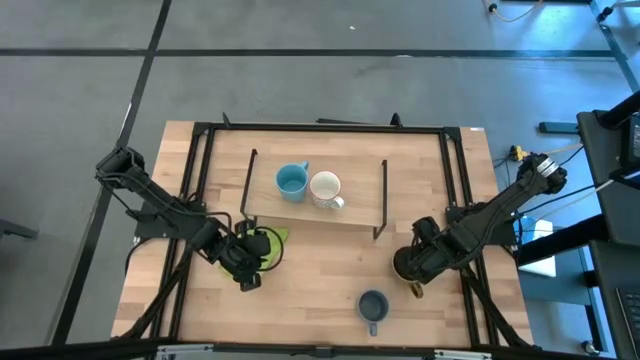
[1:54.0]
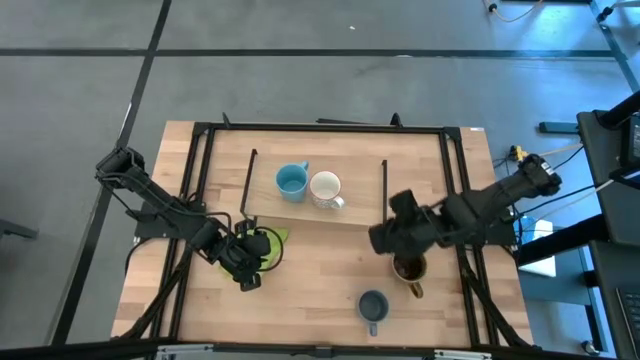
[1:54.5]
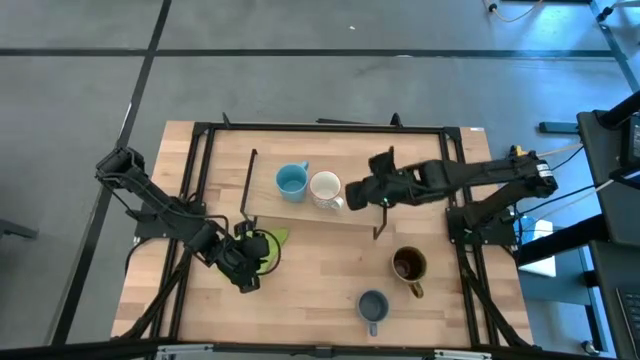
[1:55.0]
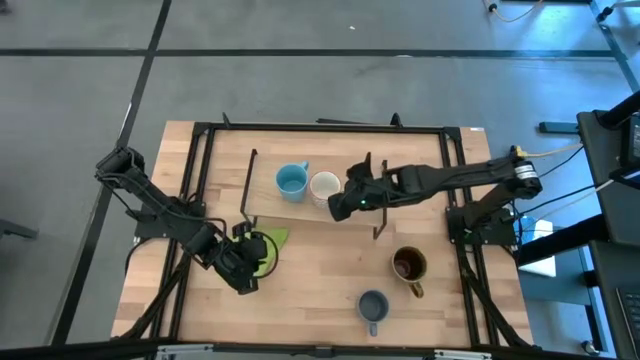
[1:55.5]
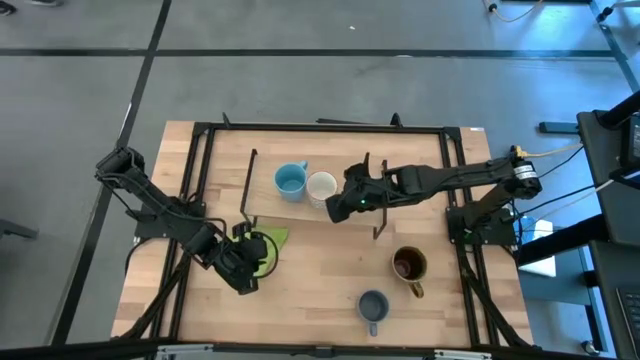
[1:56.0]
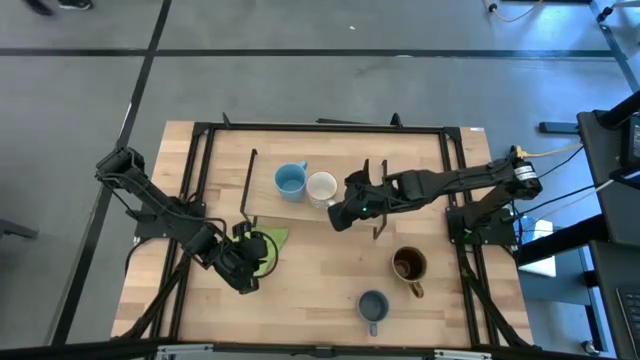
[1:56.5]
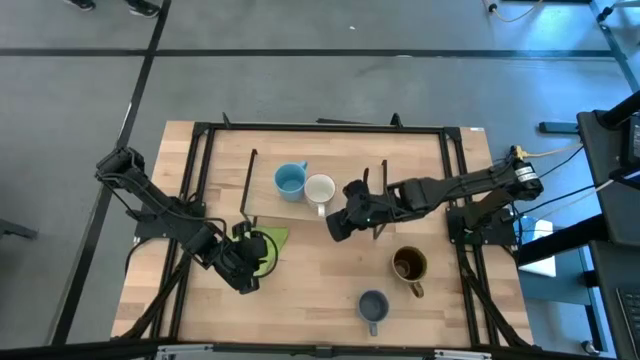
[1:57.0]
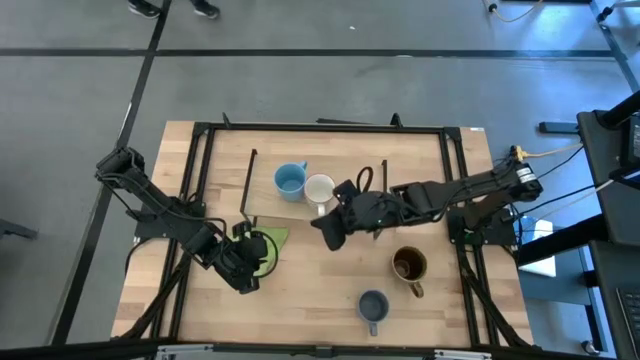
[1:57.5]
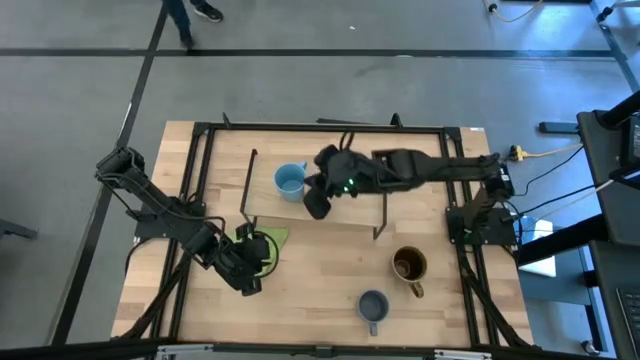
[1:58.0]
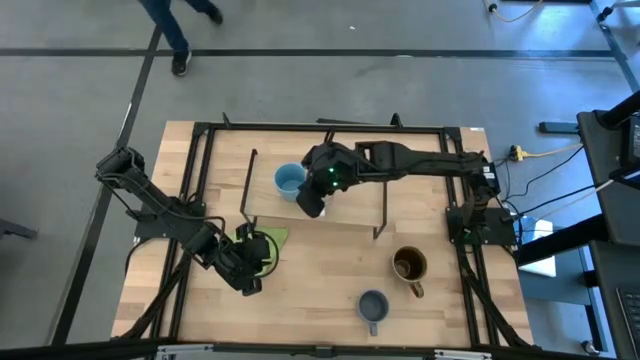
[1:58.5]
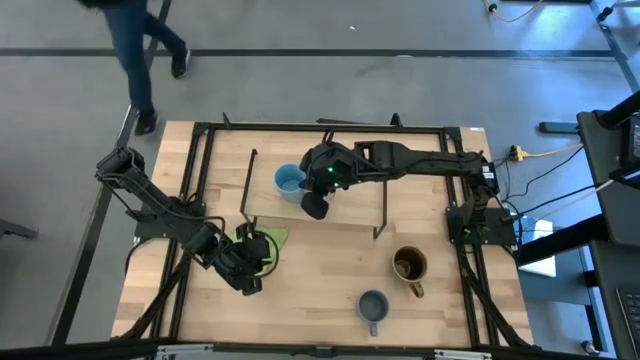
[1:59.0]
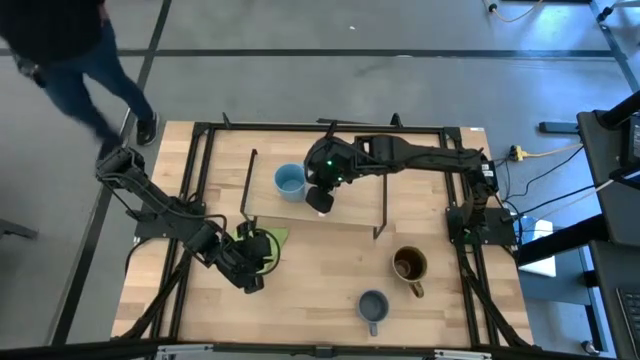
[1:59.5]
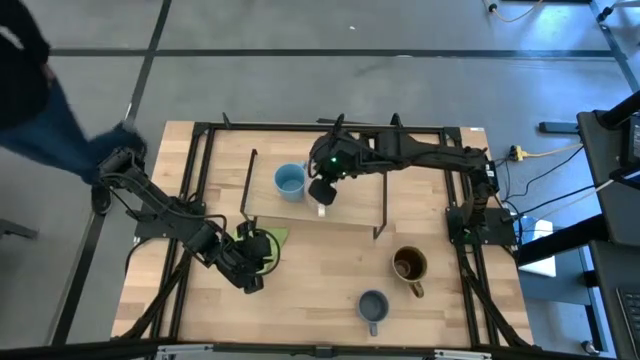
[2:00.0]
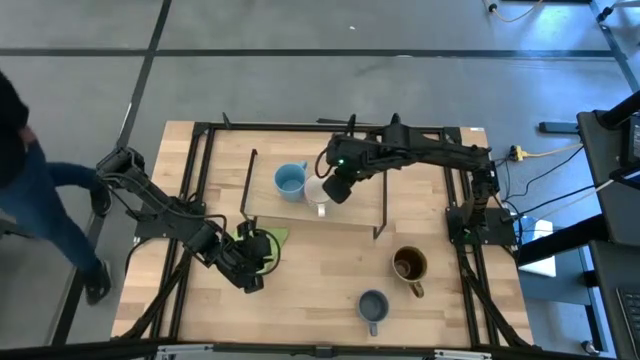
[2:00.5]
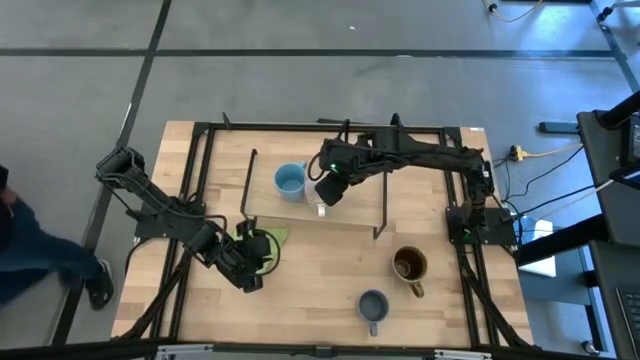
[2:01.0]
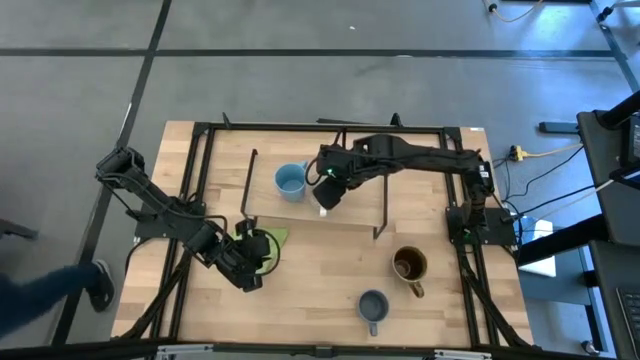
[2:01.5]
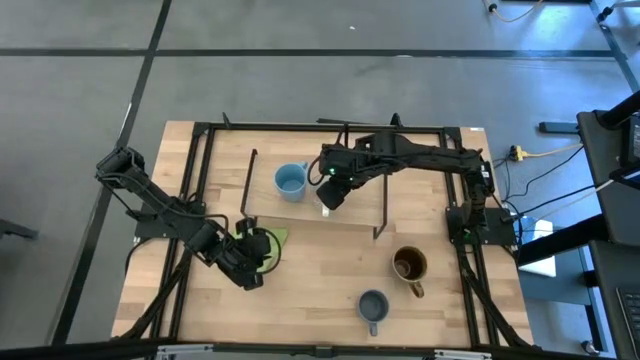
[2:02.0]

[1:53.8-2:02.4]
Task: Stack small to large cups/mugs on shelf
Adjust the gray patterned mug on the shelf

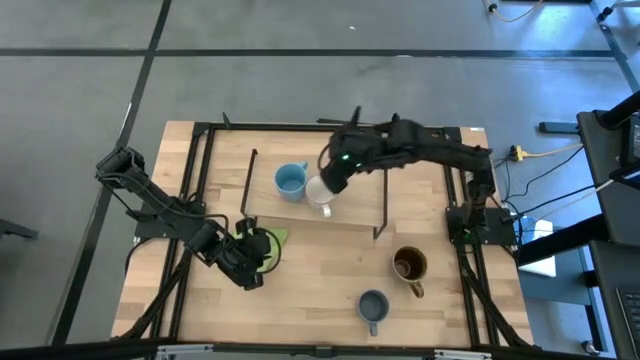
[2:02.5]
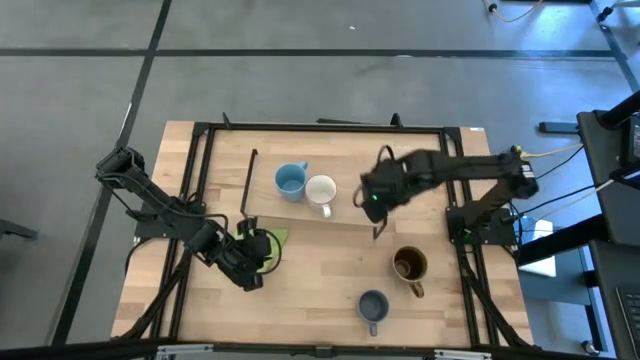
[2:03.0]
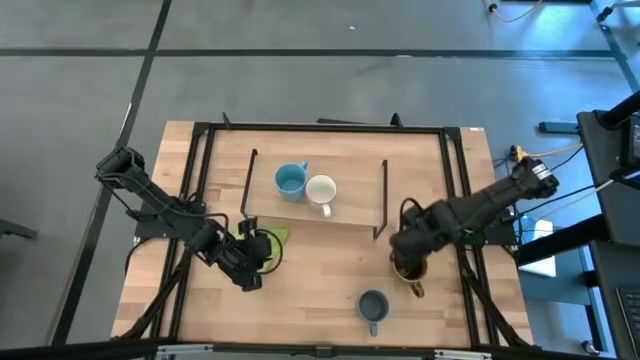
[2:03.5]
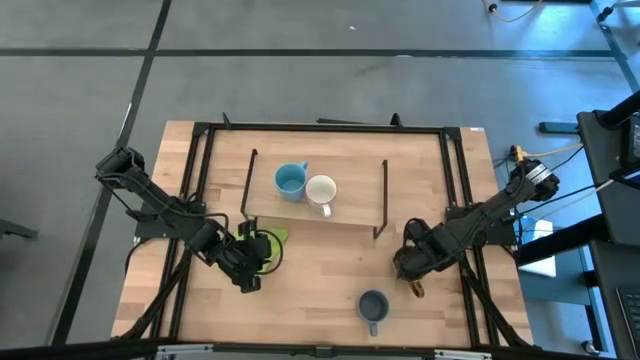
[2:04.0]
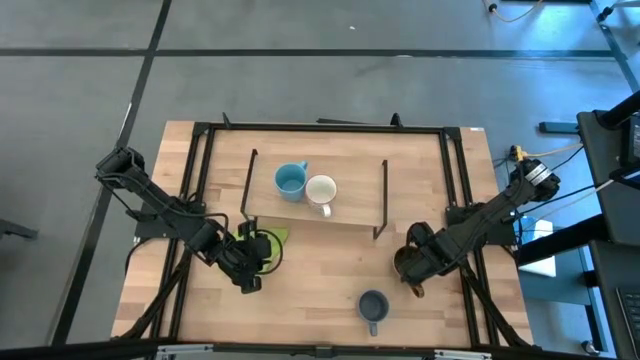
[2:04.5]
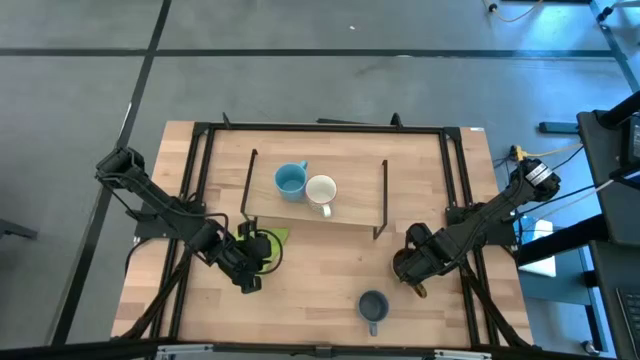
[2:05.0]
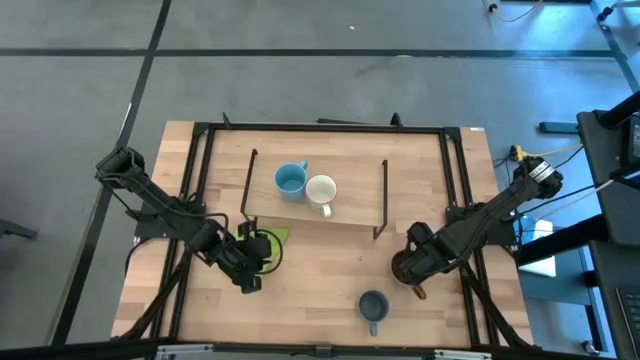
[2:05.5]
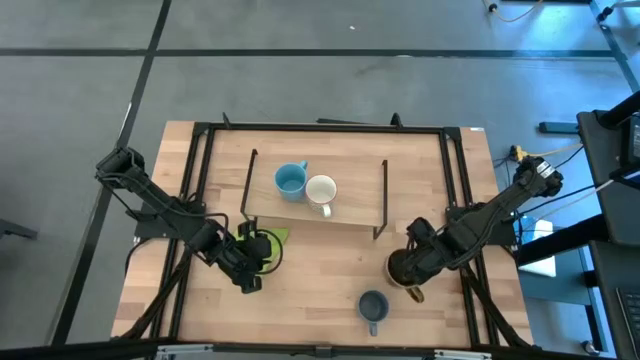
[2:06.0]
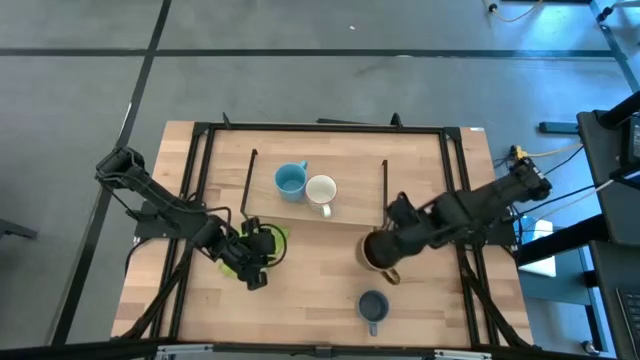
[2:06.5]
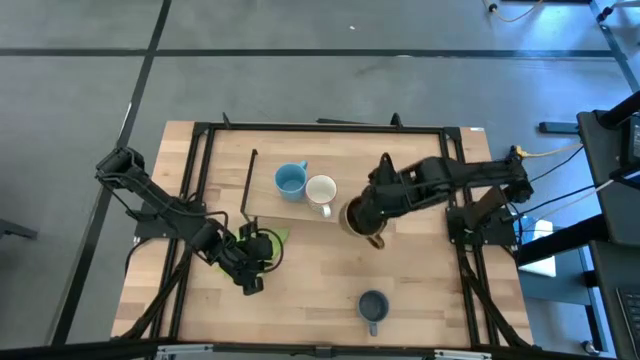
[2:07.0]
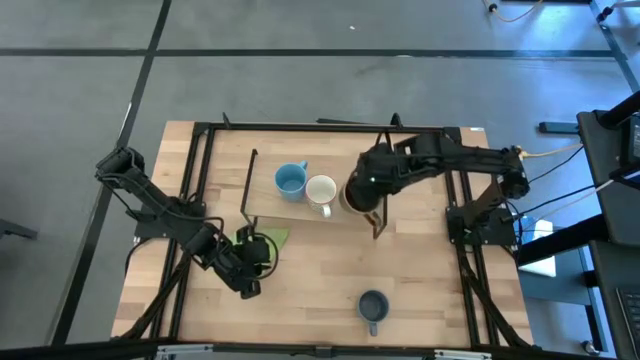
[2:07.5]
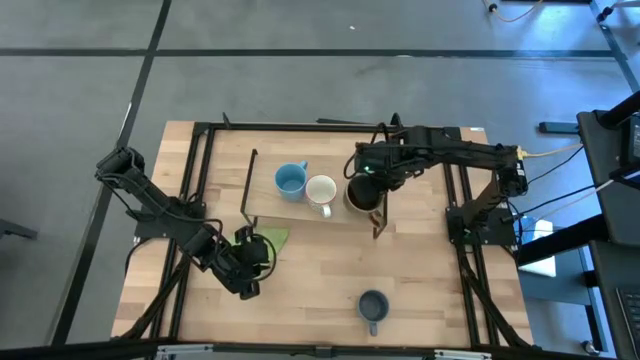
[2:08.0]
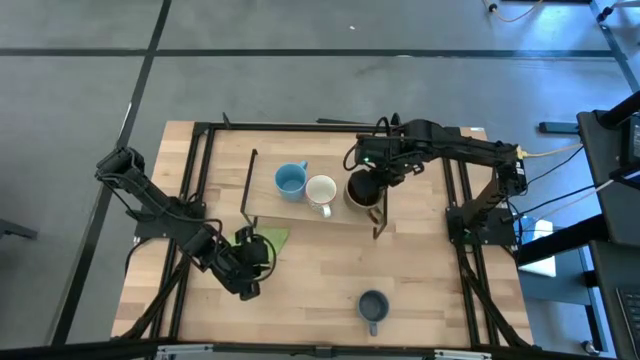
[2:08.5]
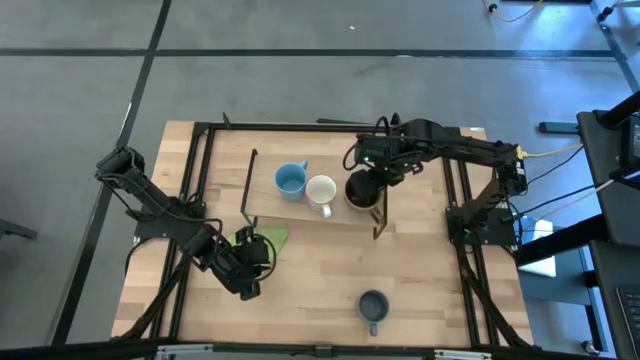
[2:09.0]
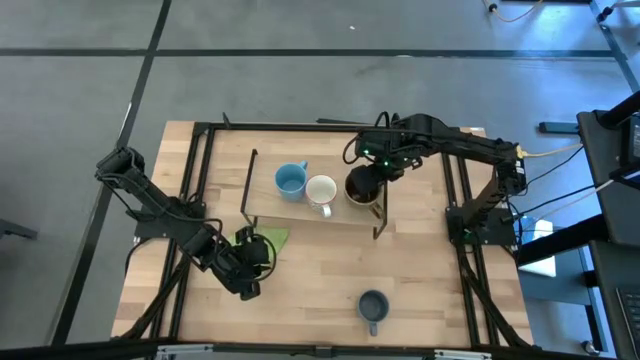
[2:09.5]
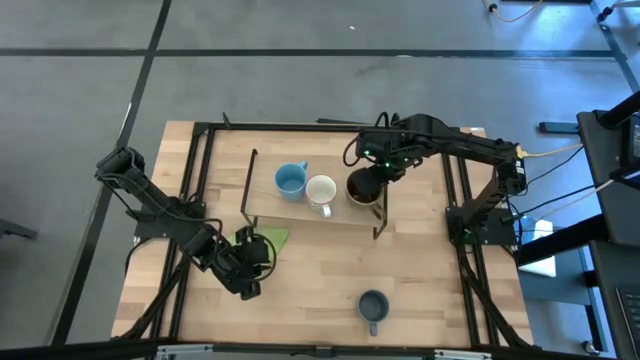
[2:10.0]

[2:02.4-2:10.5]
Put the green mug on the shelf

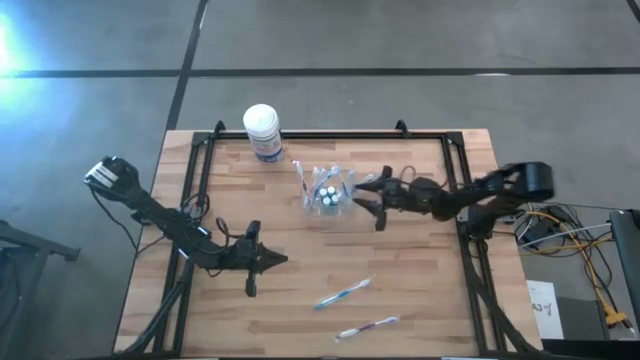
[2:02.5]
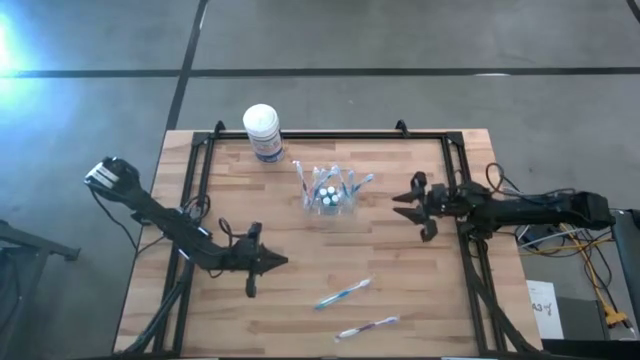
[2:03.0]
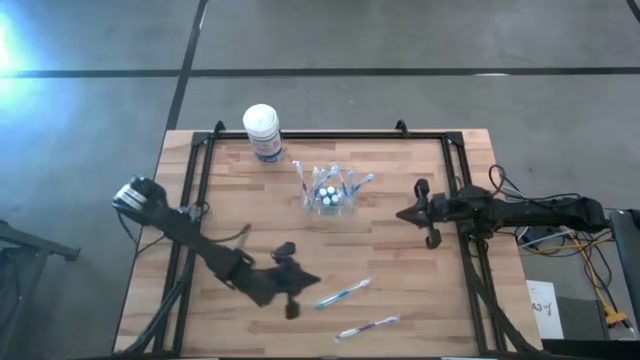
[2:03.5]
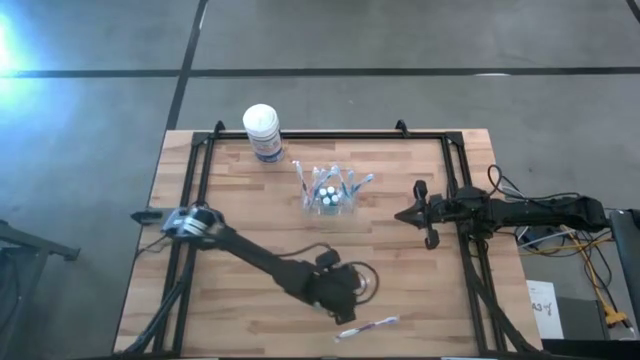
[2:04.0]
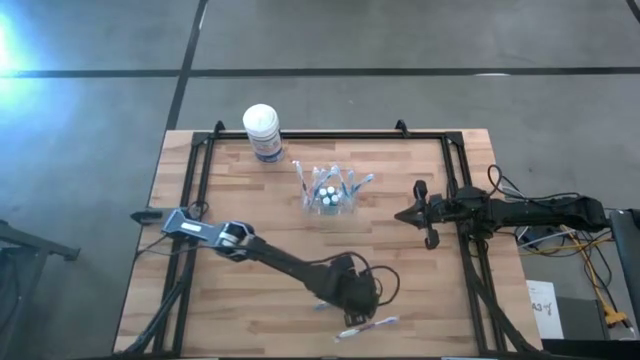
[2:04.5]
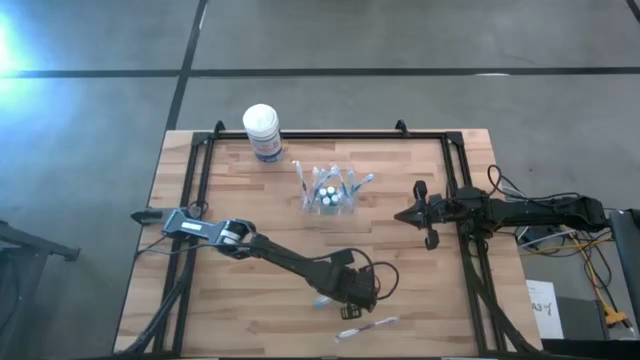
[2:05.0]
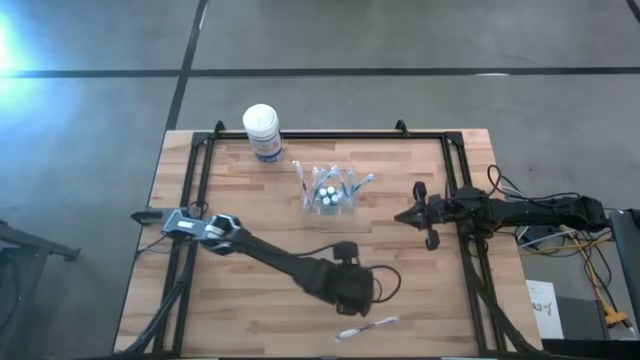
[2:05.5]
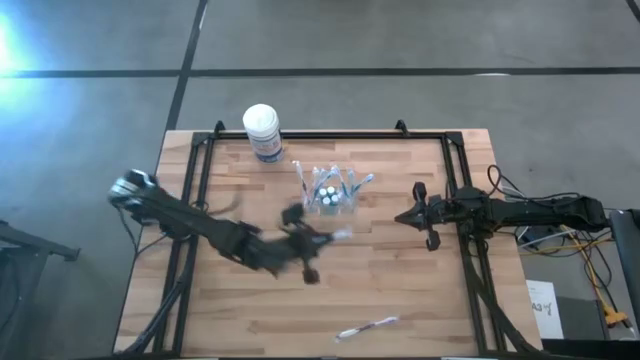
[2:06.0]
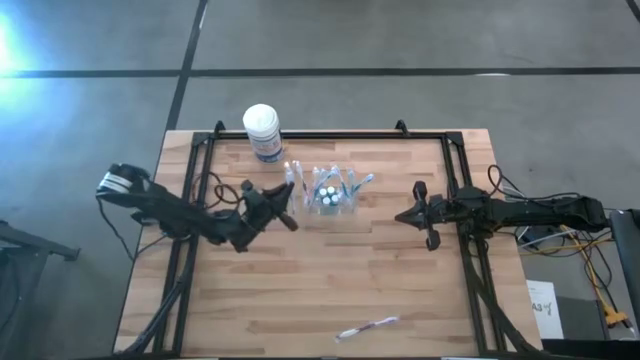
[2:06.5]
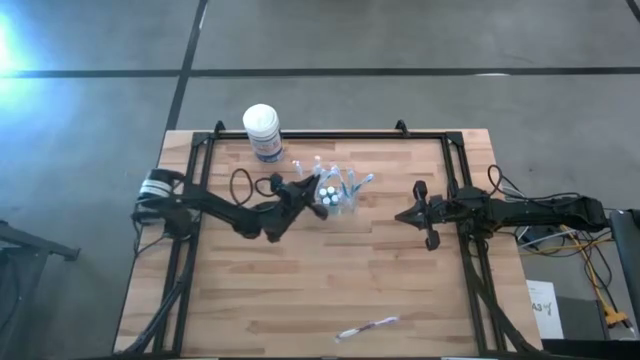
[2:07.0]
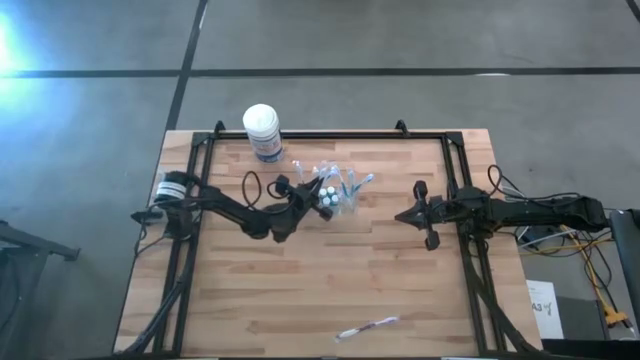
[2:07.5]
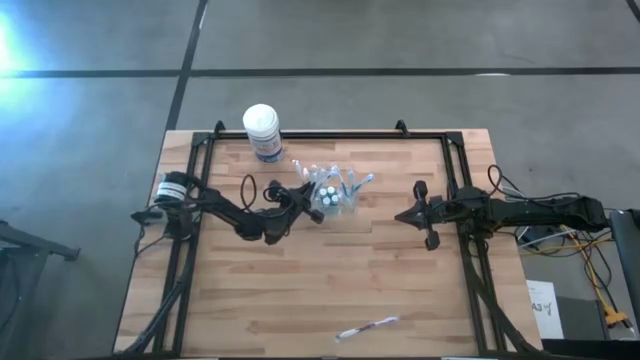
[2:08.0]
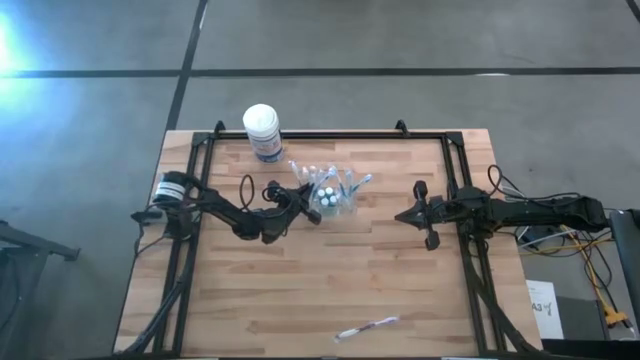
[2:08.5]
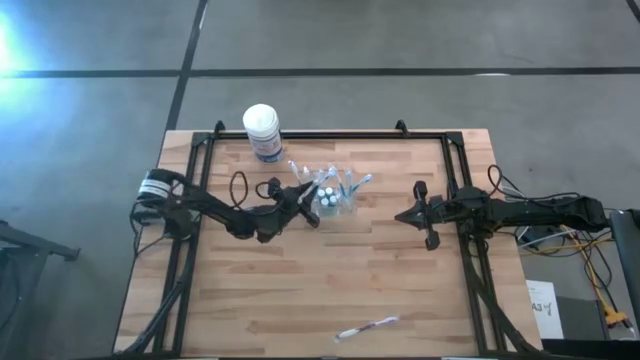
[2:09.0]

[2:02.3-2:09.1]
Task: Pick & Place toothbrushing station
Put the blue toothbrush into the transparent organizer
